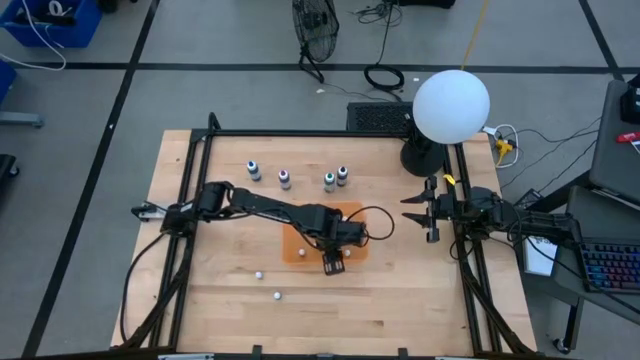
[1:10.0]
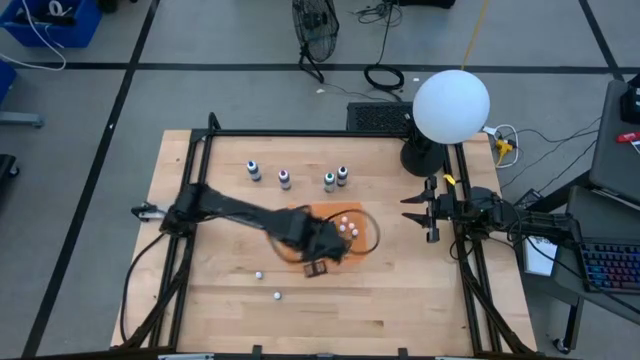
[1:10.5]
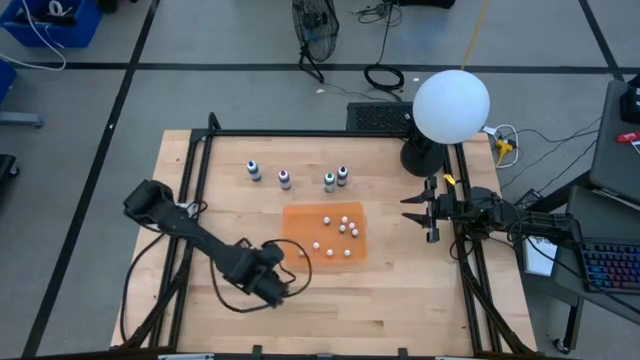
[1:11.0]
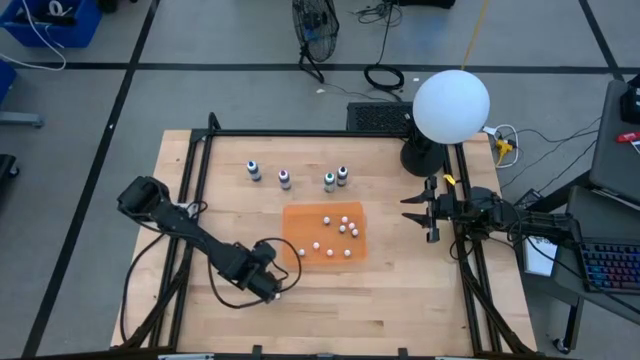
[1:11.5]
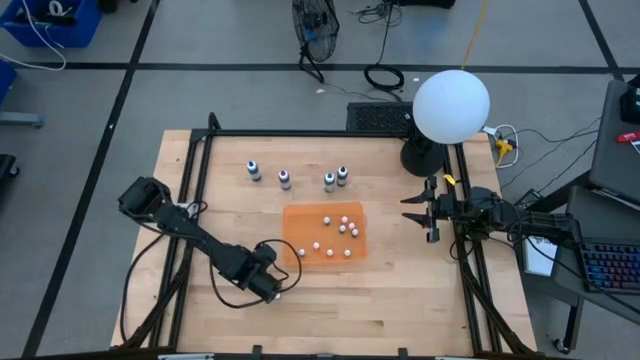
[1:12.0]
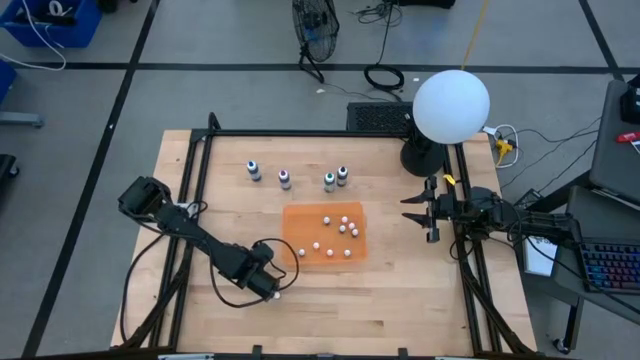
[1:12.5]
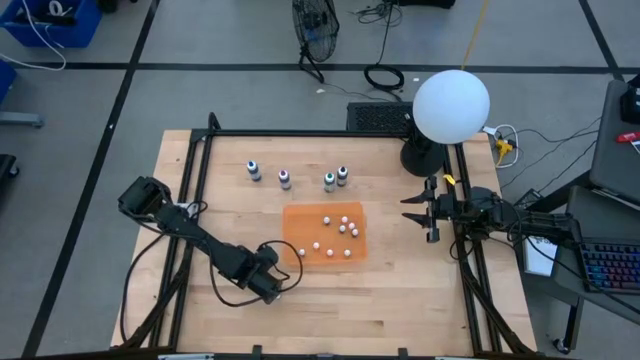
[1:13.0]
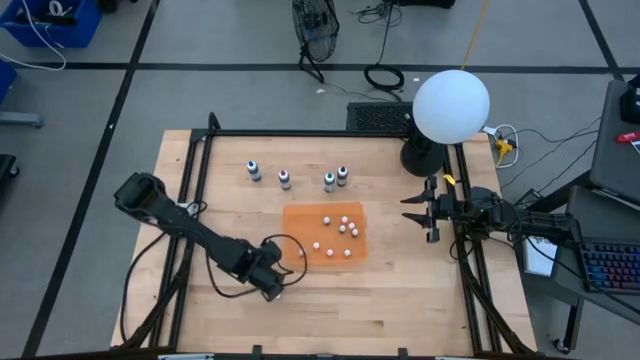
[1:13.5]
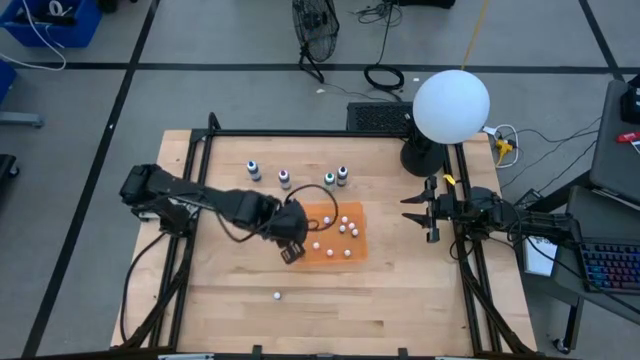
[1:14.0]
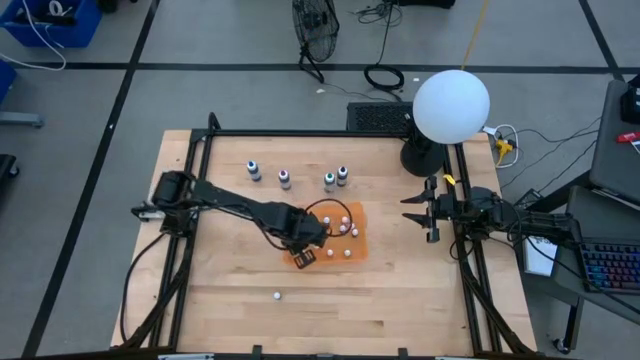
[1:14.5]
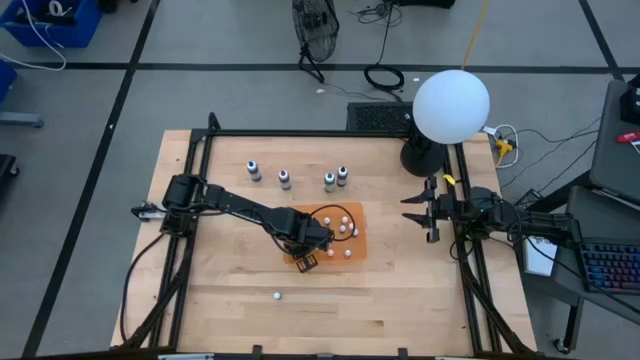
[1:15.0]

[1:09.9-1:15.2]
Task: Pick & Place food coloring
Put the small orange food coloring bottle into the orange bin

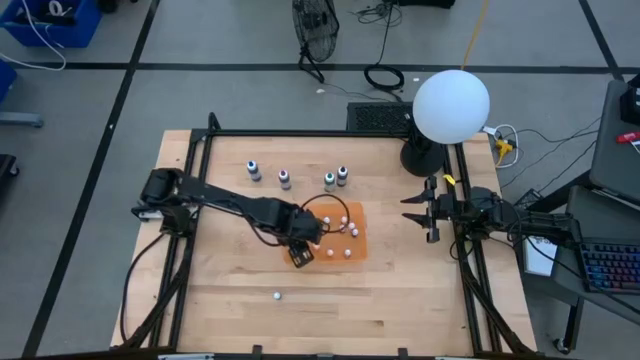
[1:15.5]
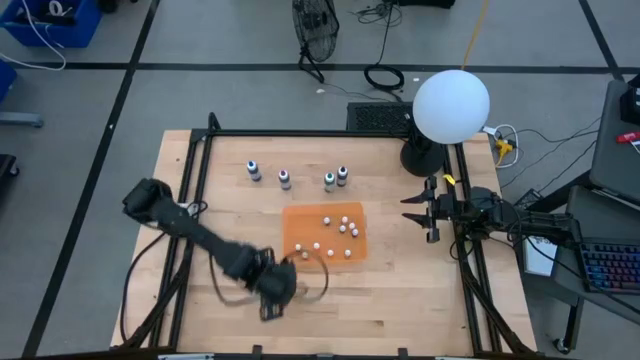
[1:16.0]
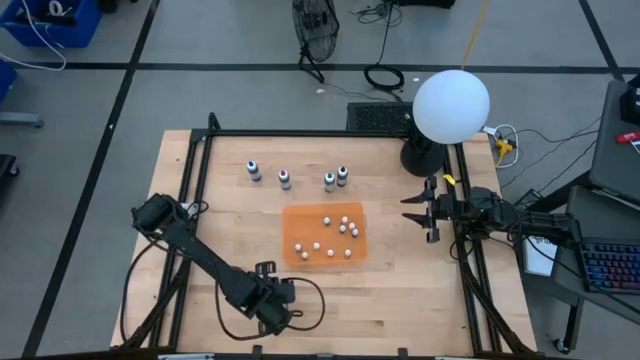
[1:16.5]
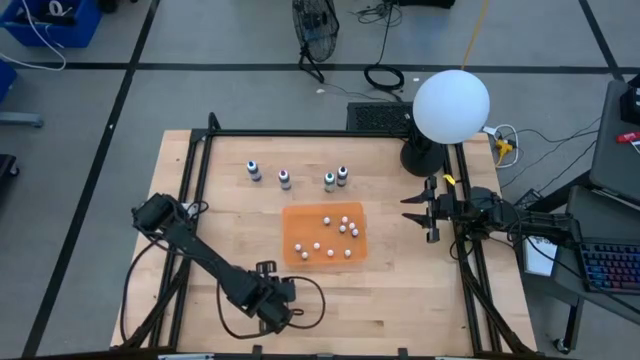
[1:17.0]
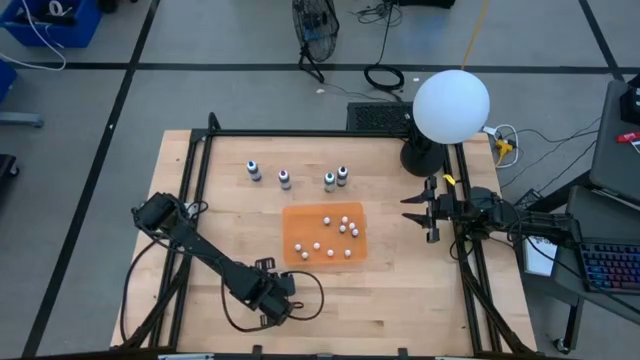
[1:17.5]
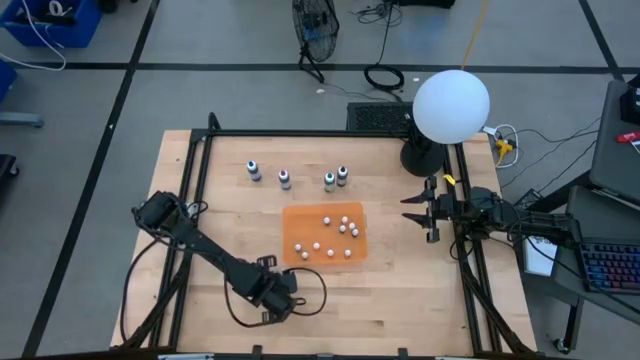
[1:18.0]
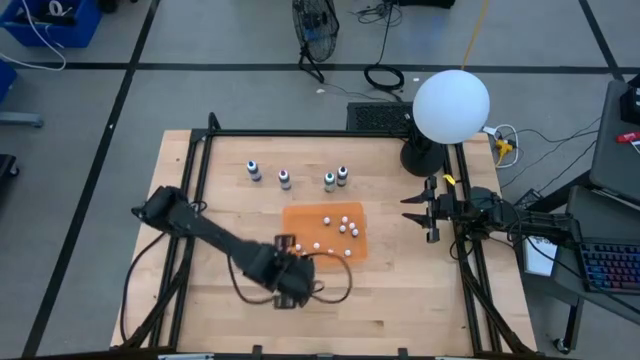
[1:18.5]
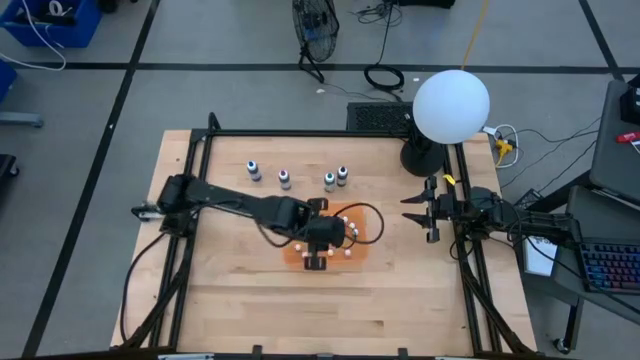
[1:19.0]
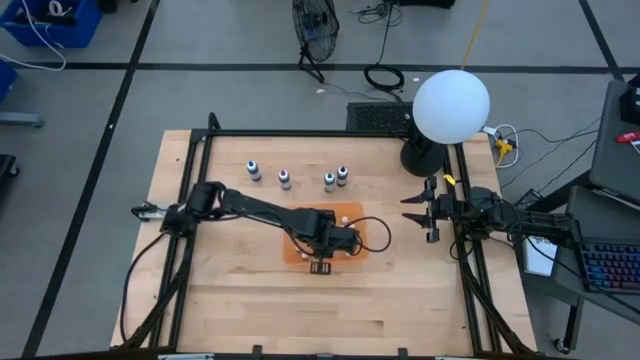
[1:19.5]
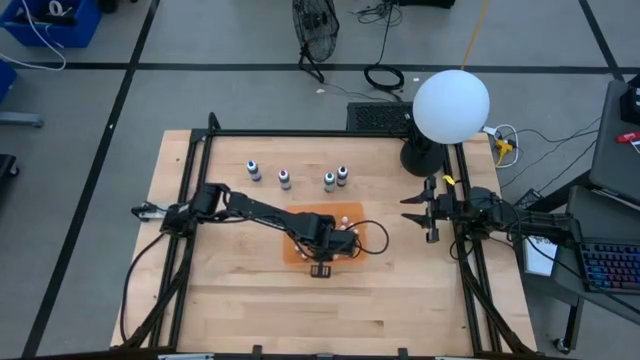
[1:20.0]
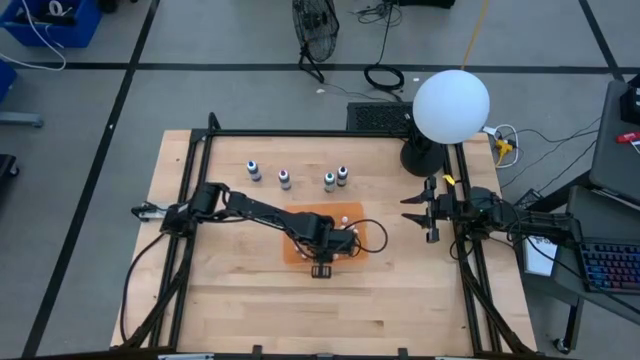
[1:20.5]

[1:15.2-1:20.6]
Put the small blue food coloring bottle into the orange bin

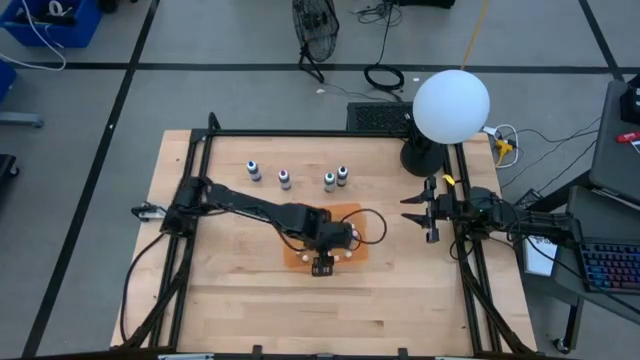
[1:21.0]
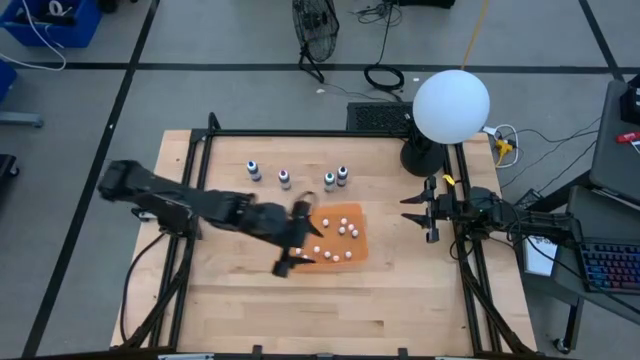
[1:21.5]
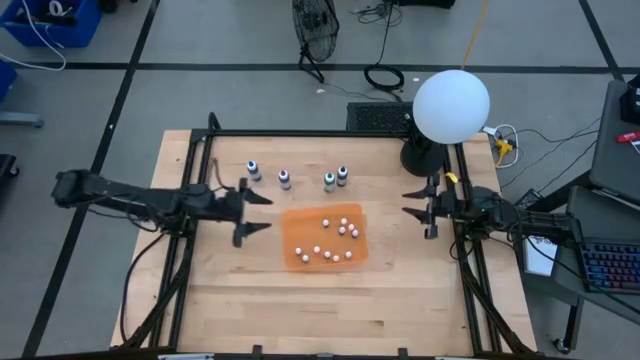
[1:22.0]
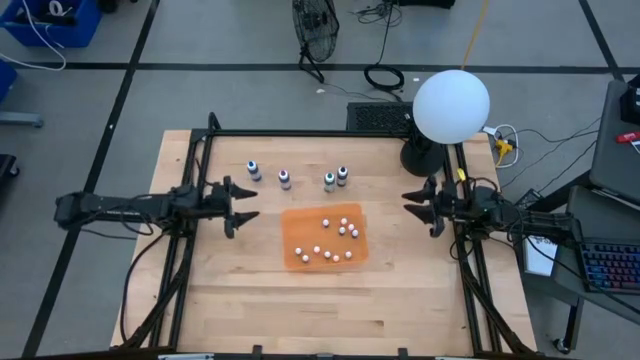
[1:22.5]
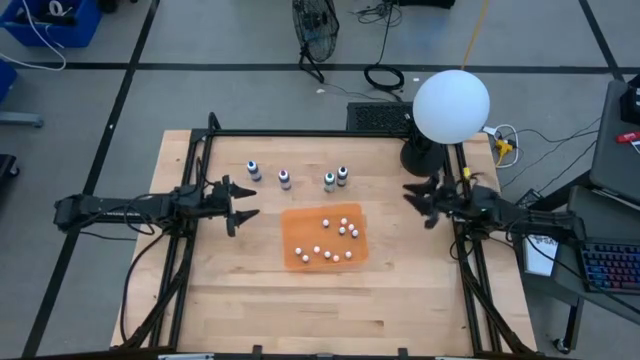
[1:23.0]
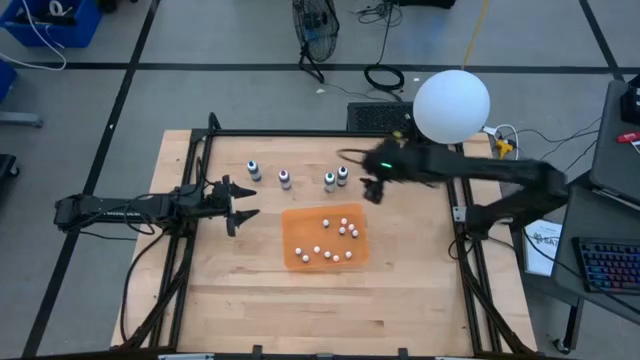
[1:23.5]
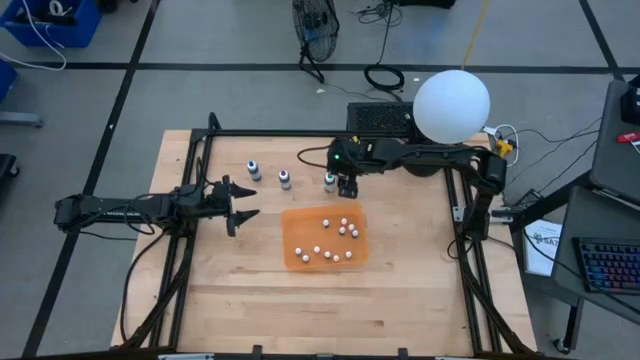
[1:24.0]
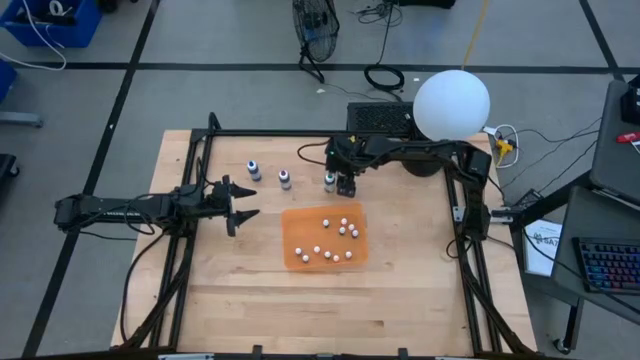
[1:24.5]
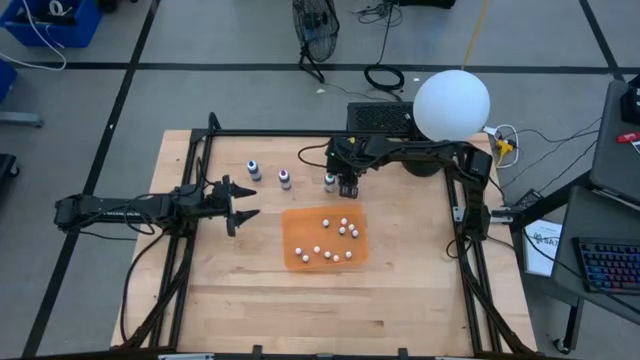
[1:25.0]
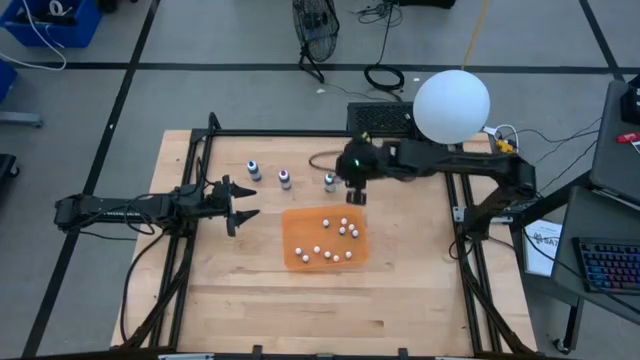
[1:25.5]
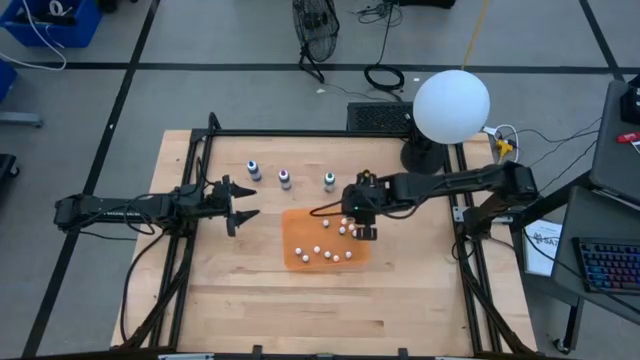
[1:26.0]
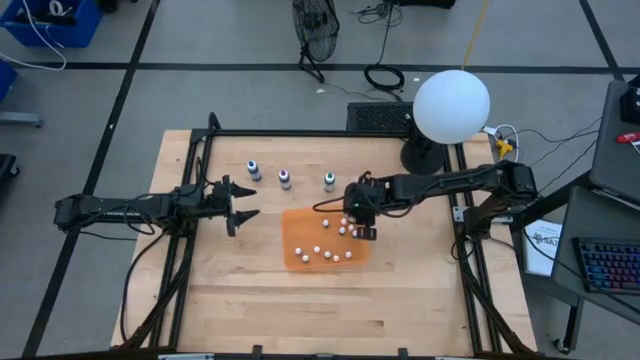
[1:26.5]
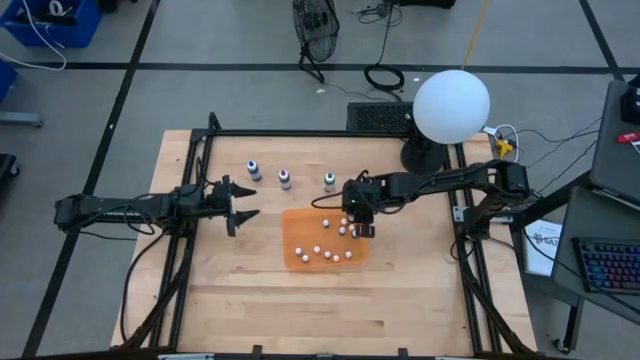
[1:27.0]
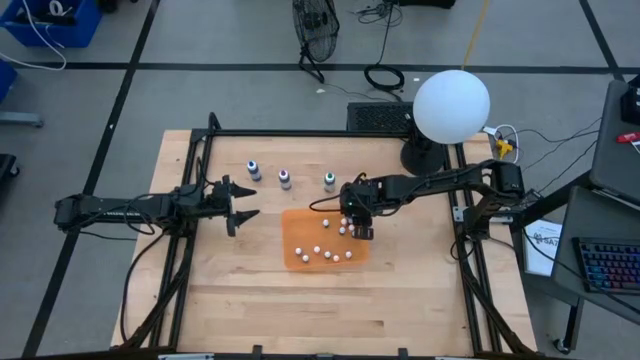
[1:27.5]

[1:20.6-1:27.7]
Put the big black food coloring bottle into the orange bin

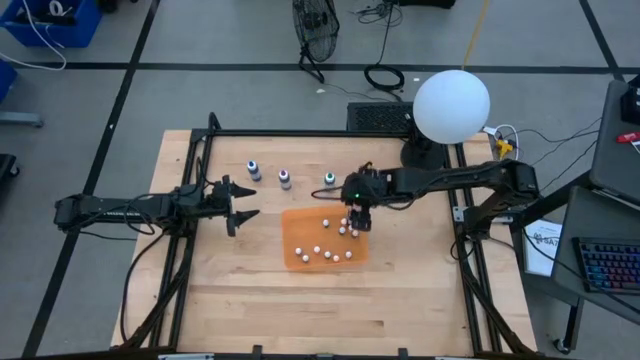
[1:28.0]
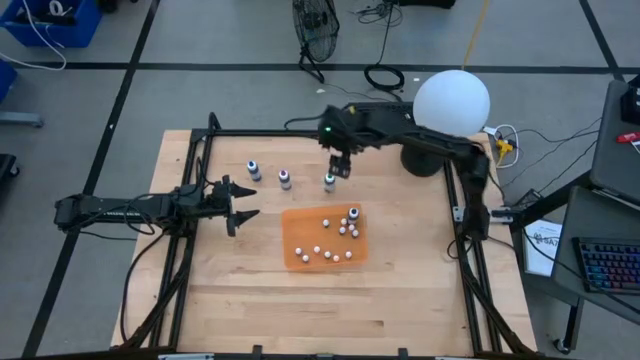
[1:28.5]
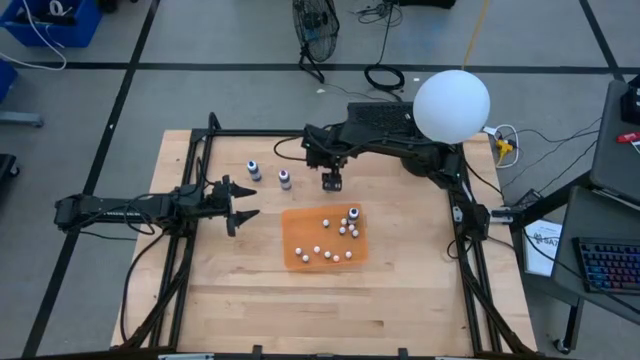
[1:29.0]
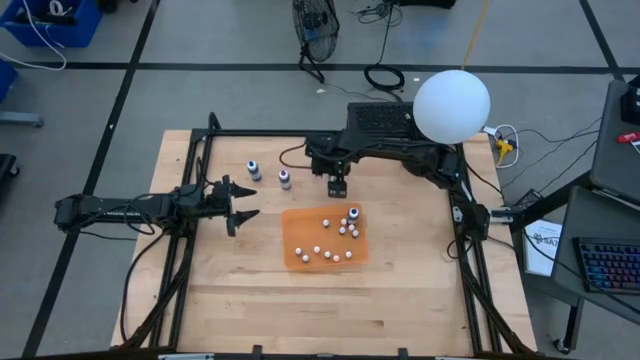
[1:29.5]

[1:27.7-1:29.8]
Put the big green food coloring bottle into the orange bin

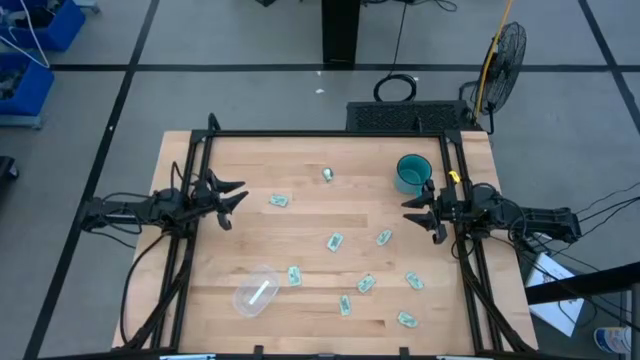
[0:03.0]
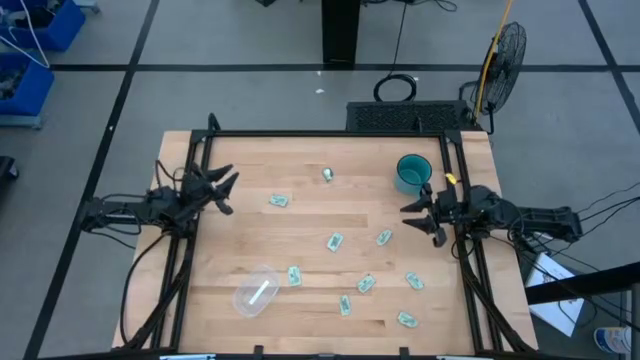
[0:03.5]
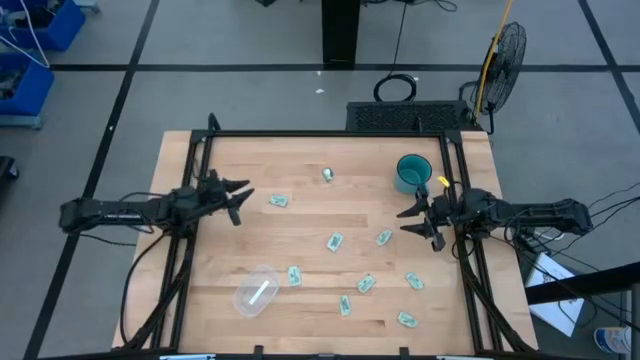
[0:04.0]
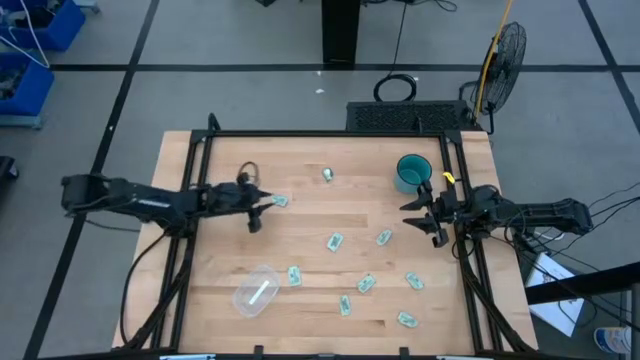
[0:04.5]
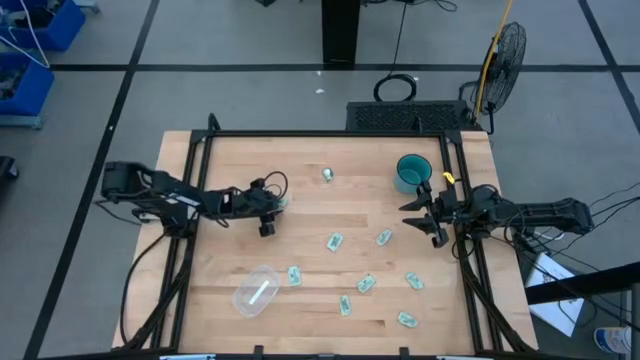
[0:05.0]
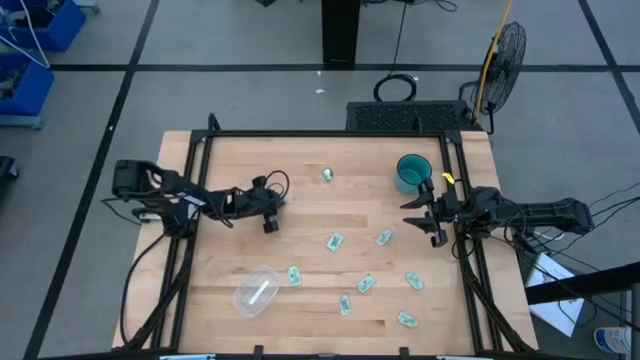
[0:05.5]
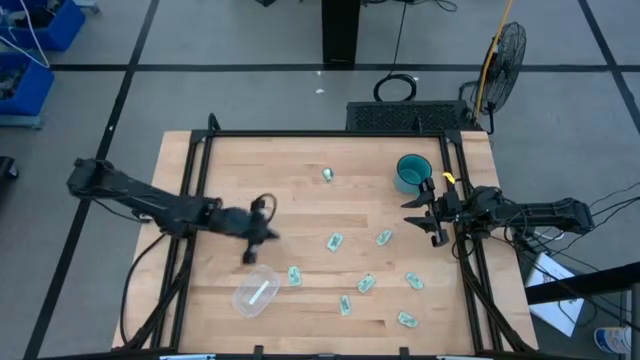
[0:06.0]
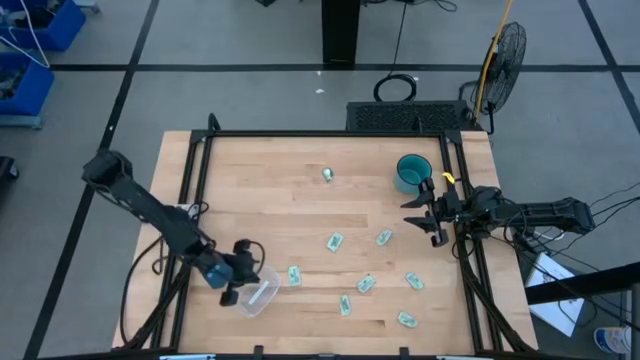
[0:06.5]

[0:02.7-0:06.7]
Task: Pick and place Stevia / Truvia into bins
Put the white stevia packet into the transparent bin
